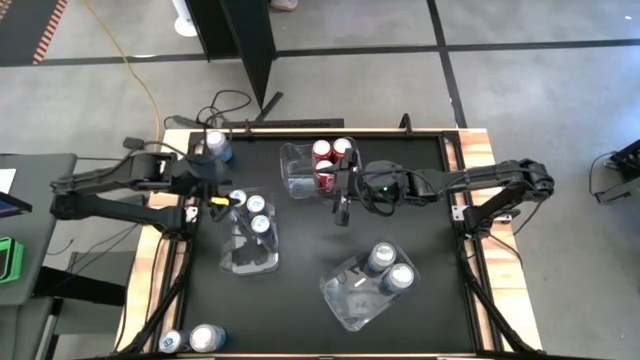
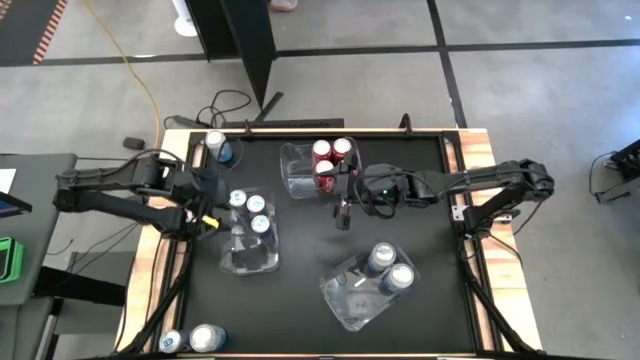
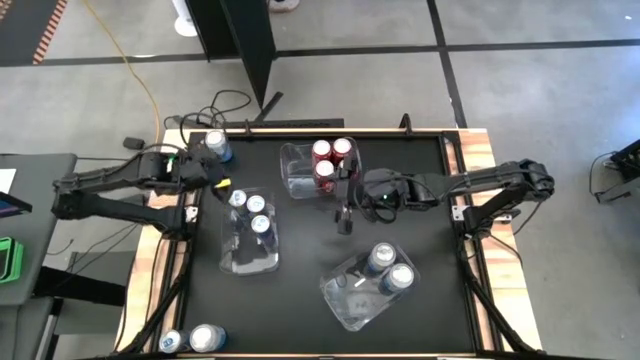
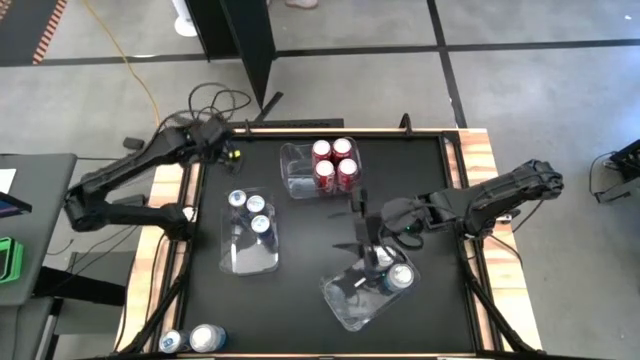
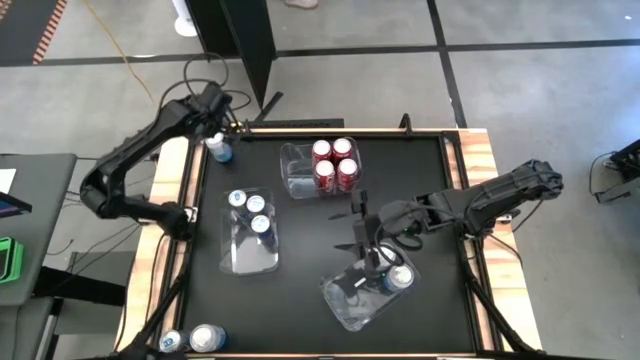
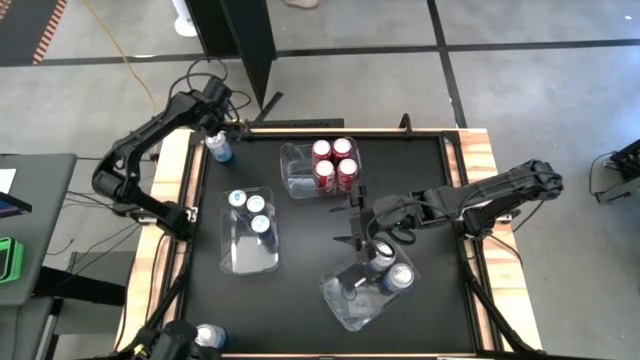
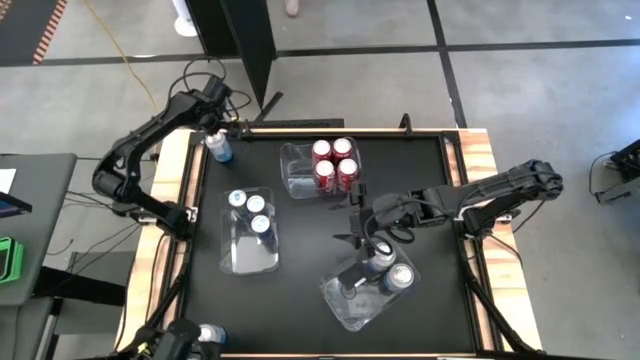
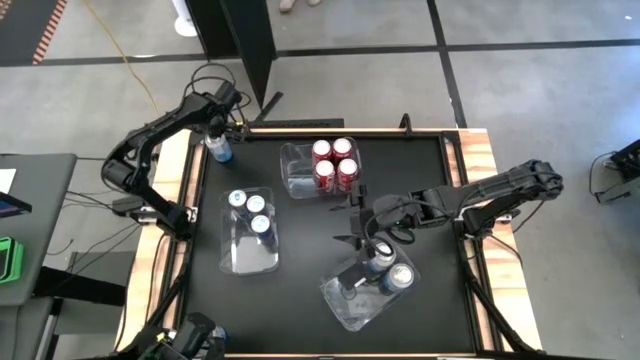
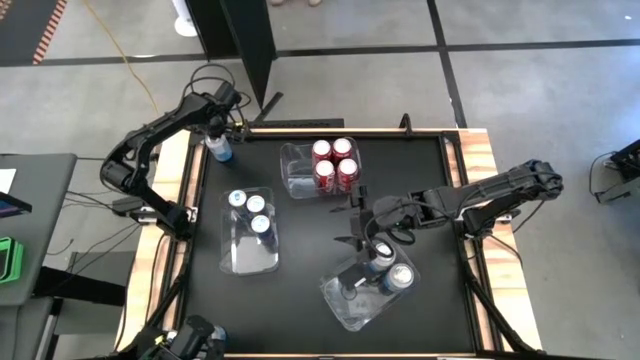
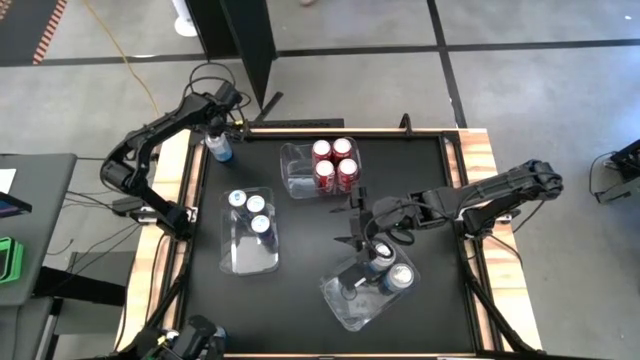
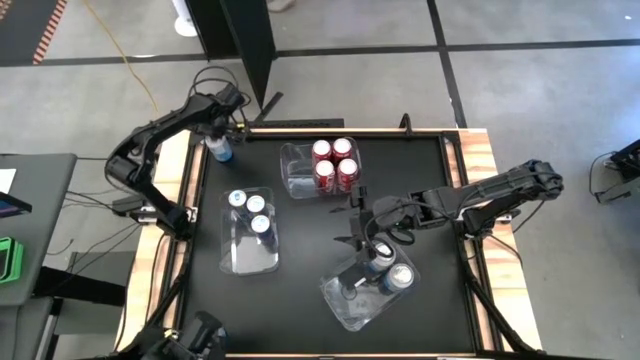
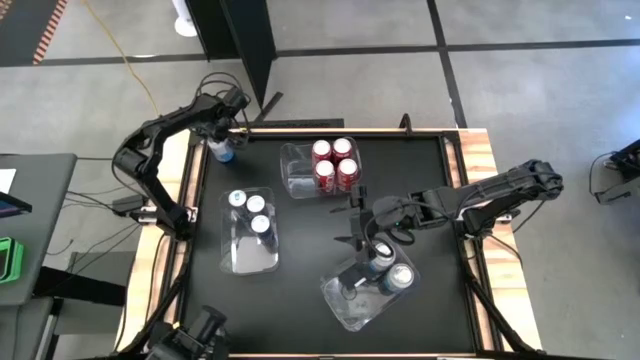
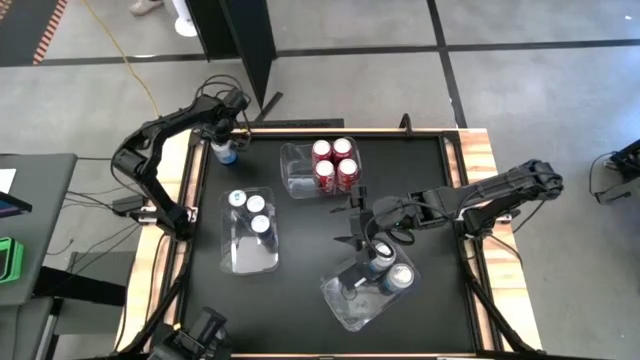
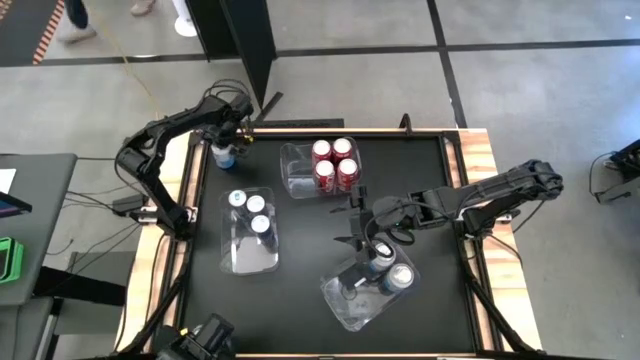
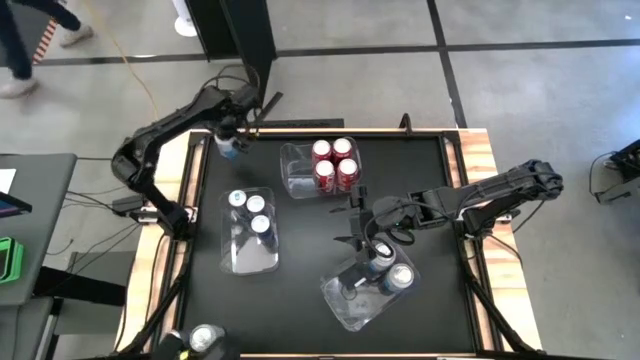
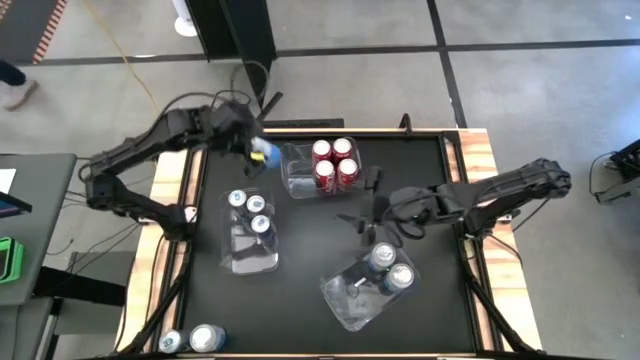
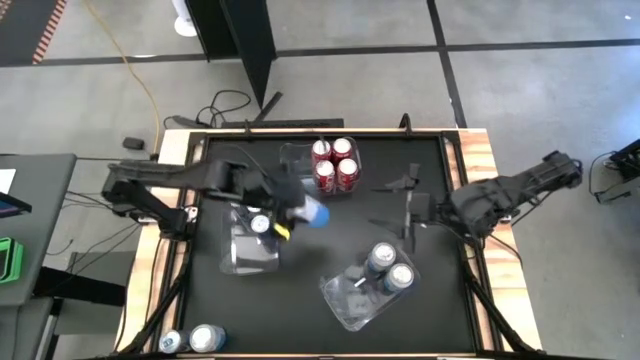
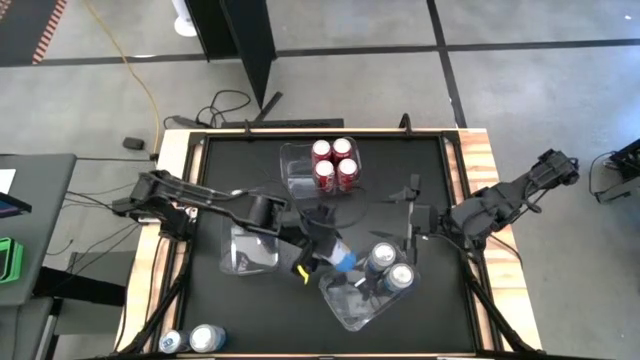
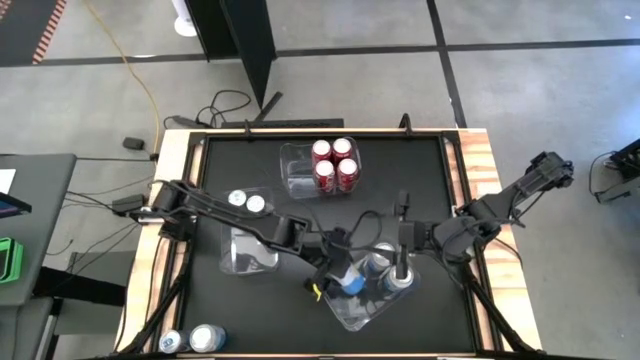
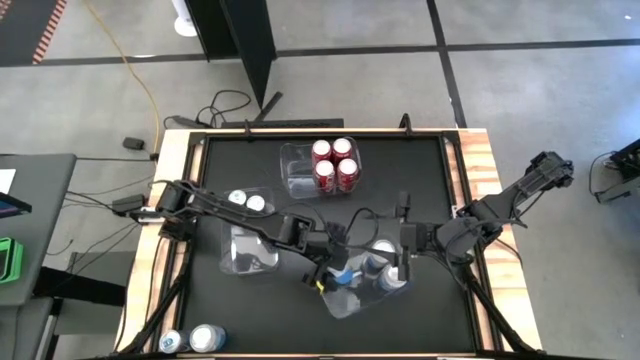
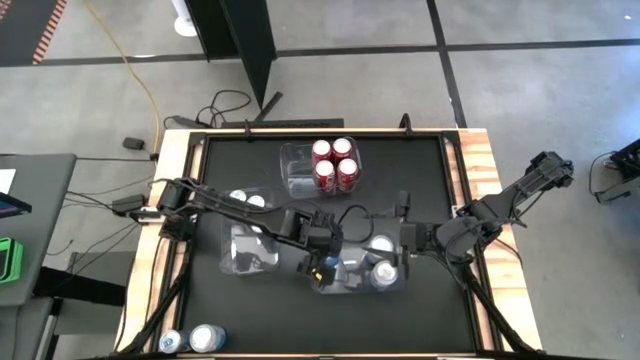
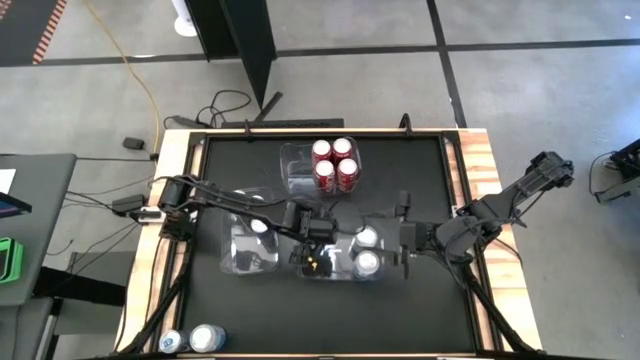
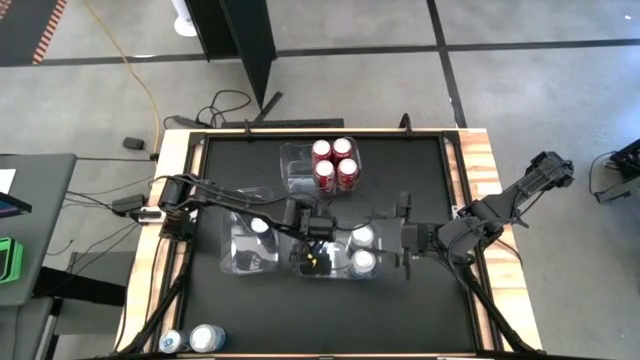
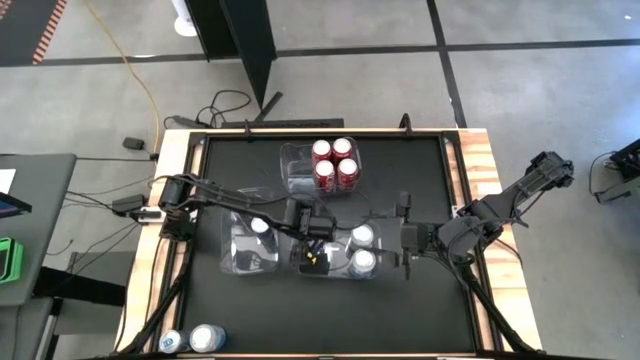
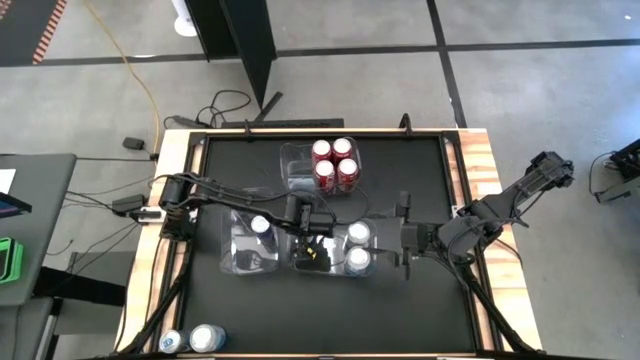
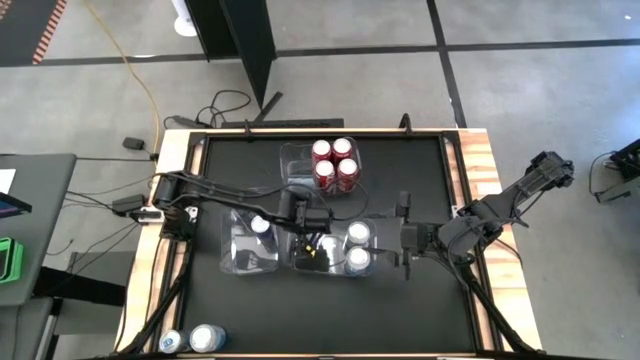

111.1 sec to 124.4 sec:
Task: Sort soda cans
Put the blue-white soda can into the bottom transparent bin

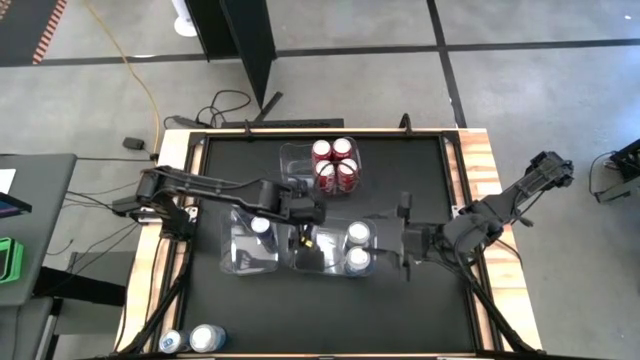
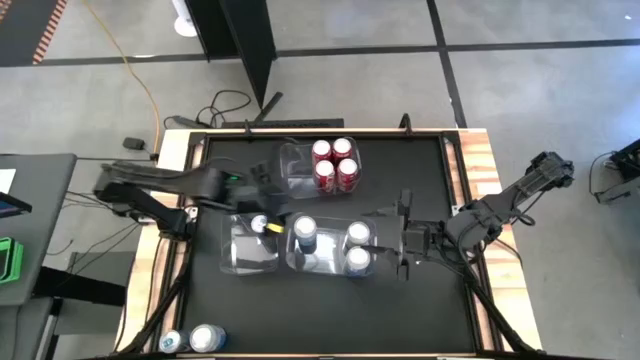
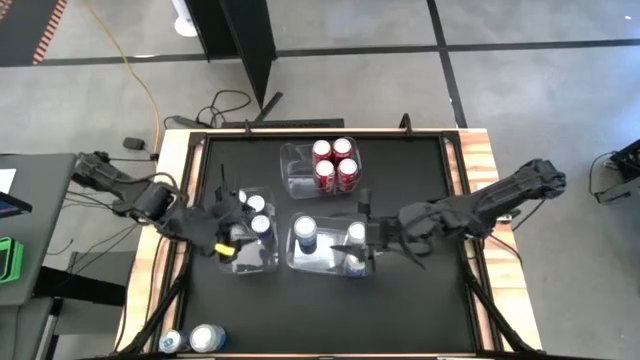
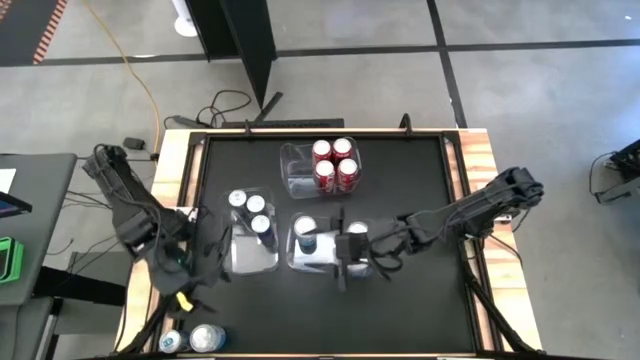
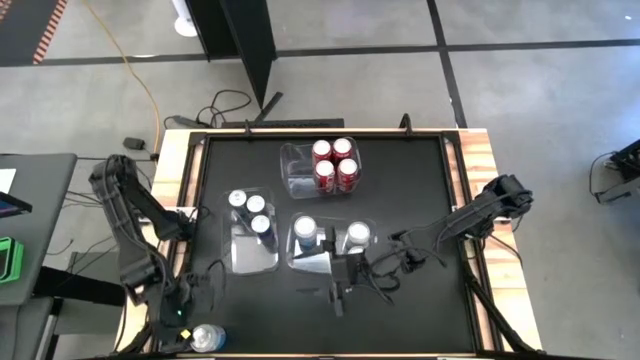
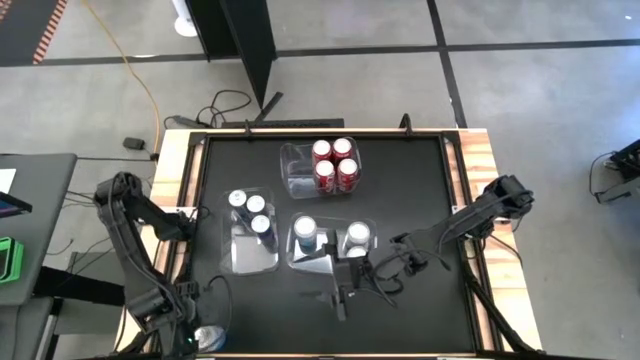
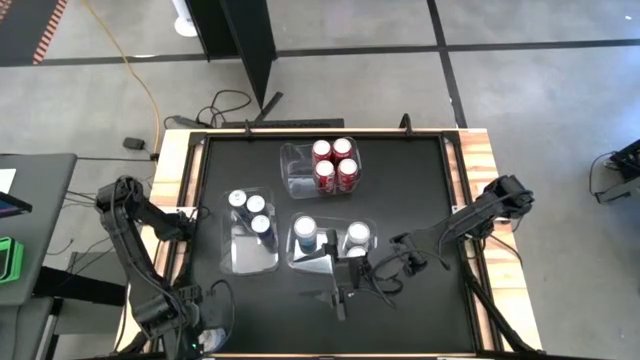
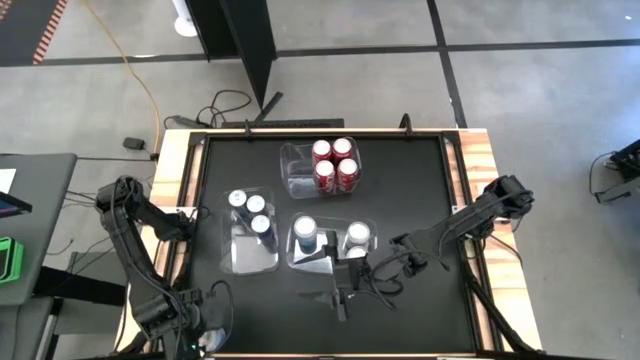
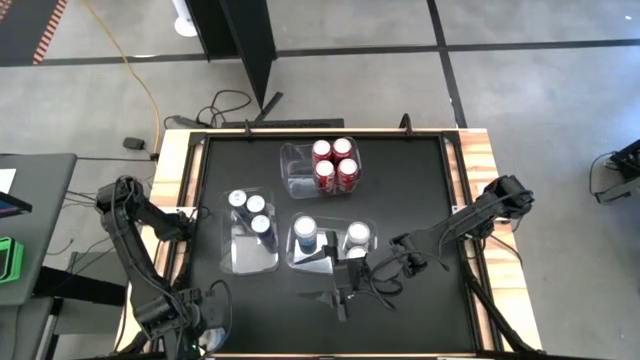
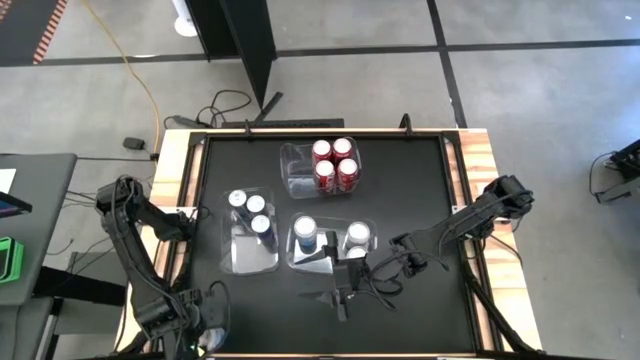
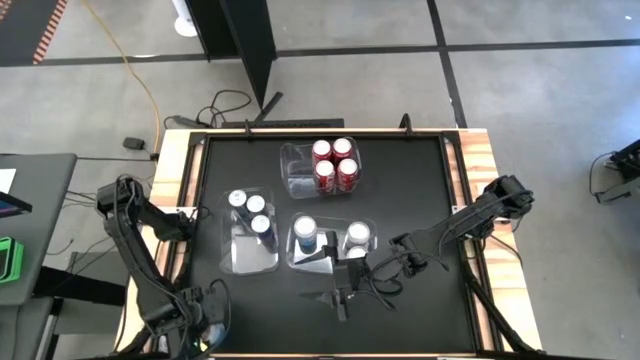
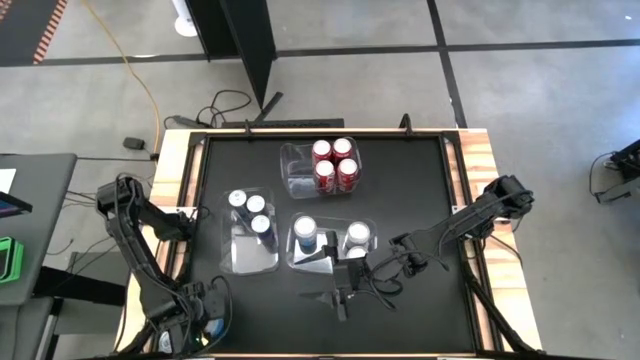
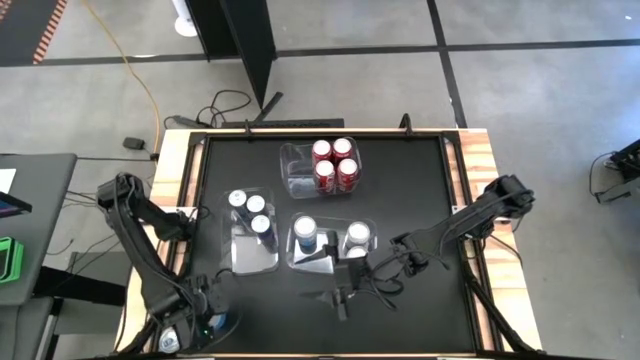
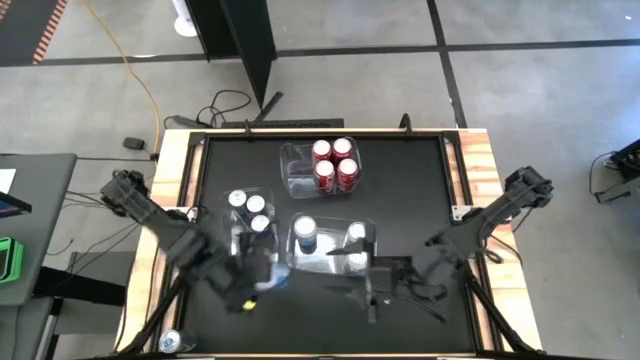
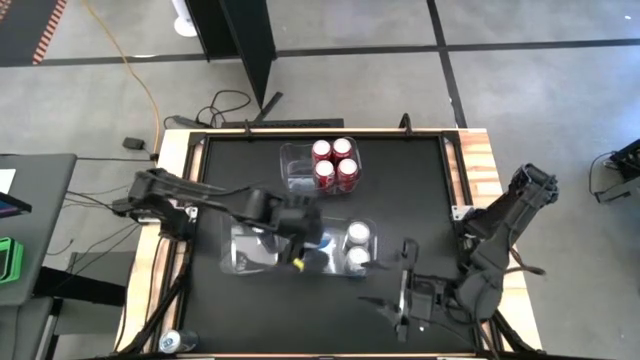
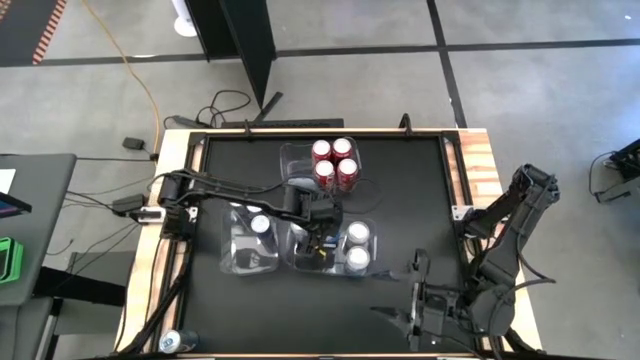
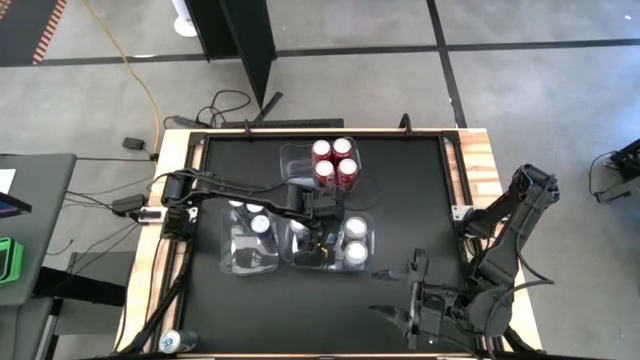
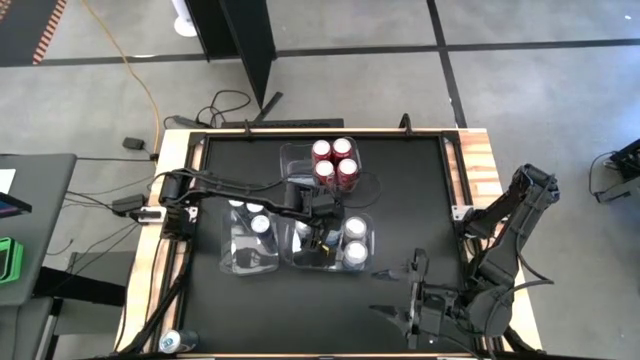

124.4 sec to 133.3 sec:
Put the blue-white soda can into the bottom transparent bin
